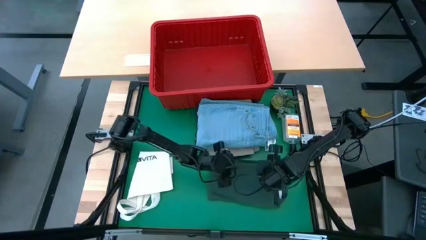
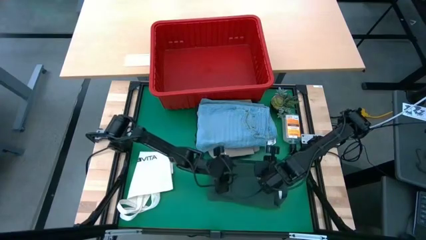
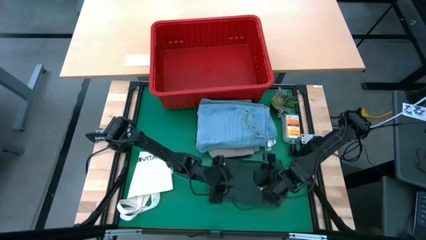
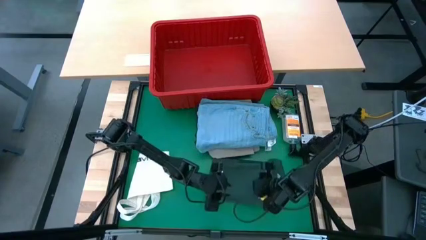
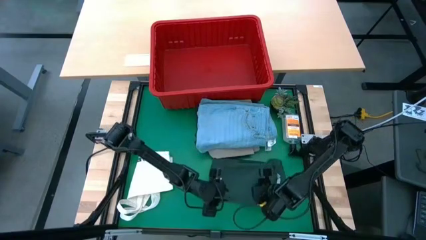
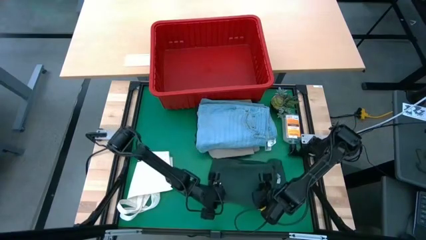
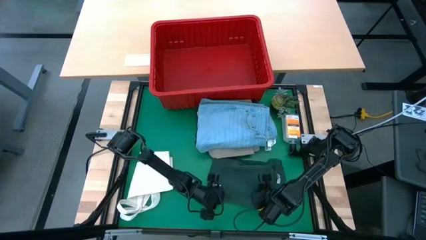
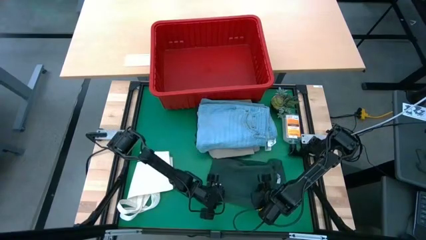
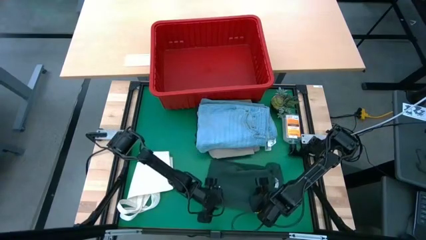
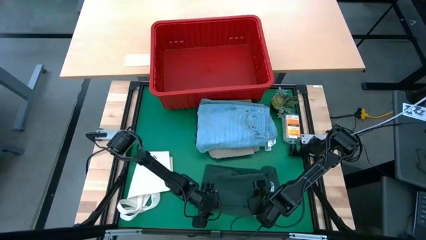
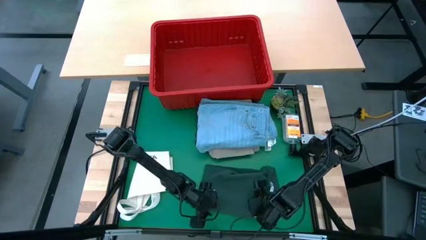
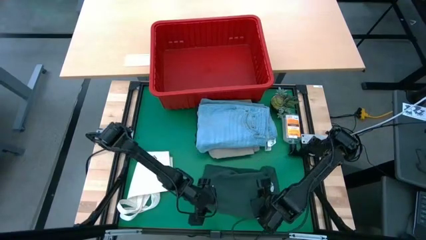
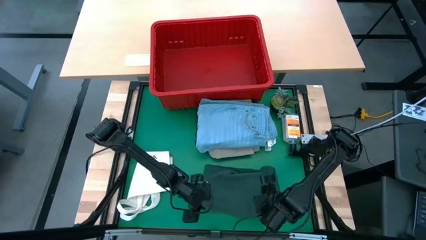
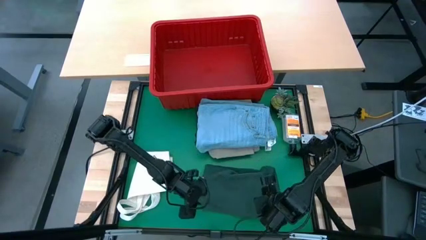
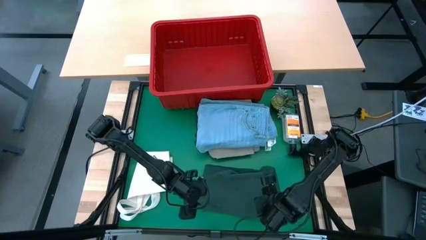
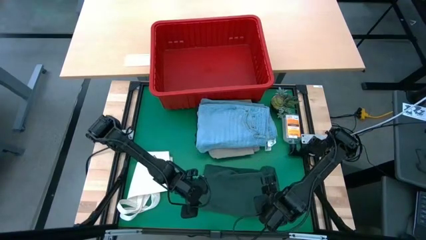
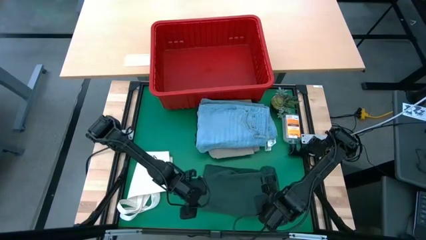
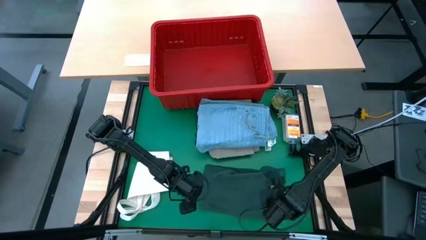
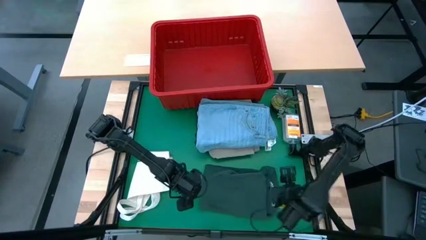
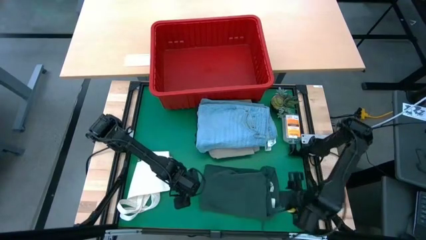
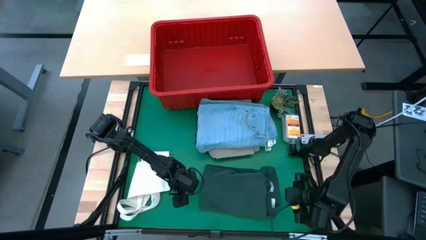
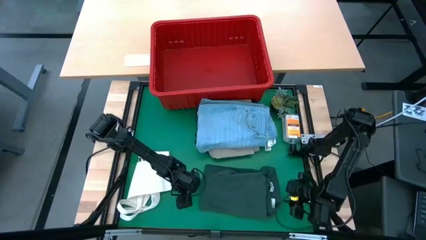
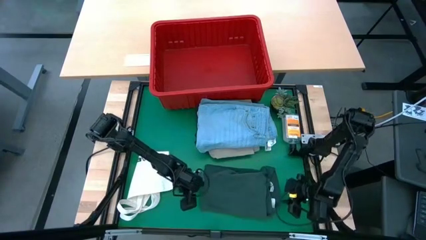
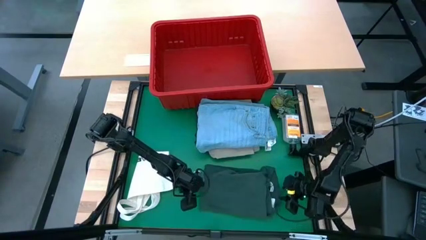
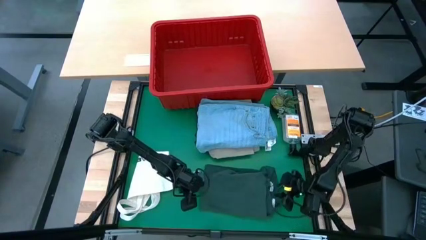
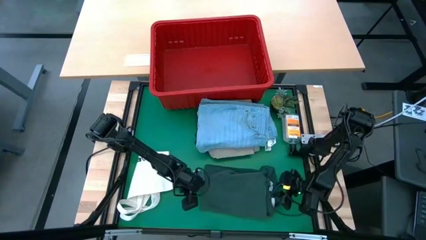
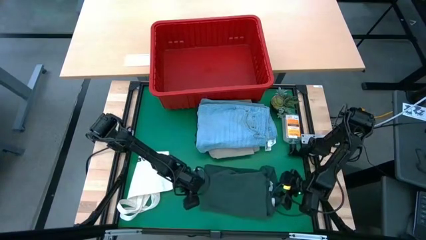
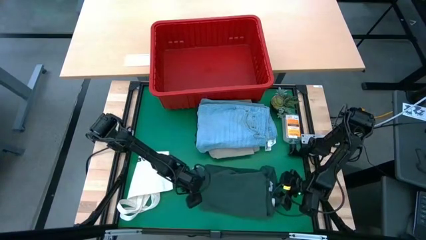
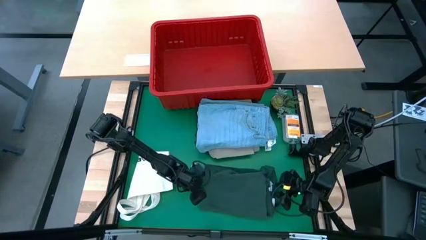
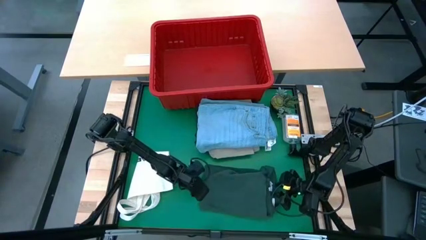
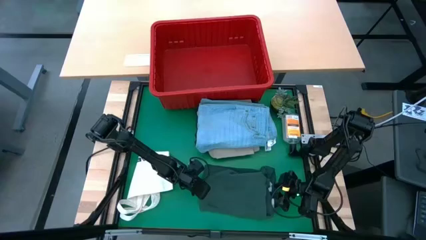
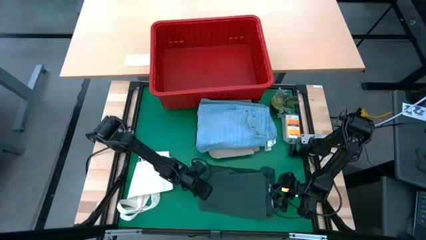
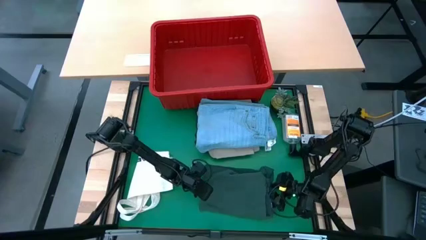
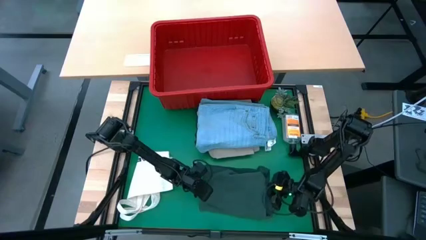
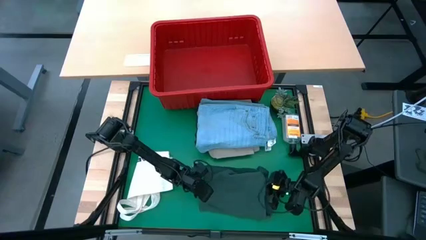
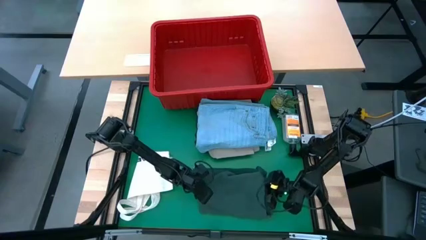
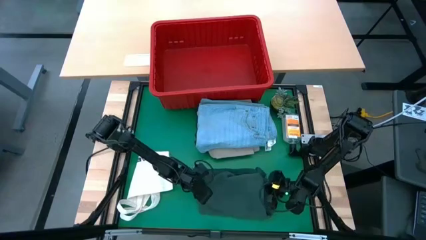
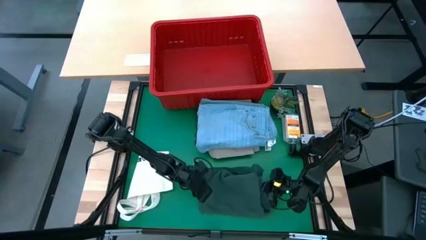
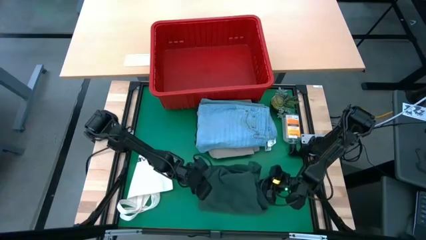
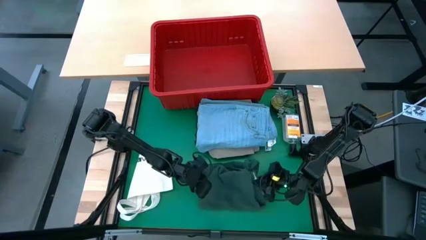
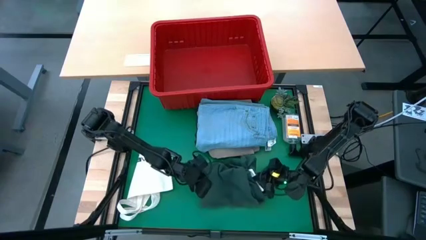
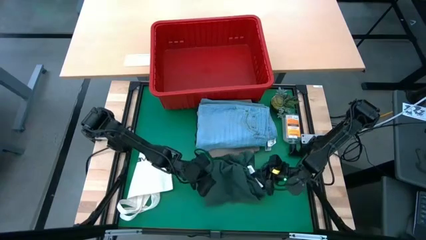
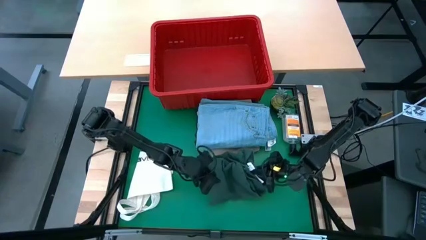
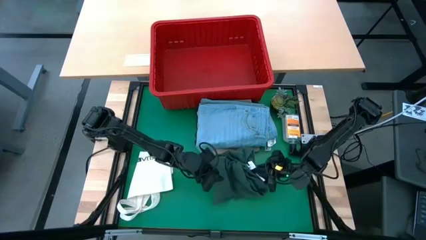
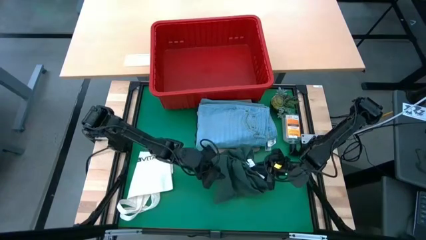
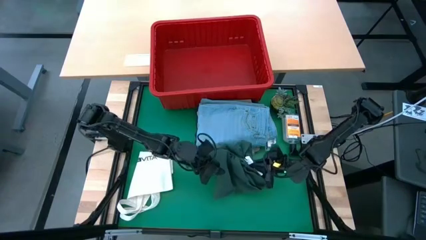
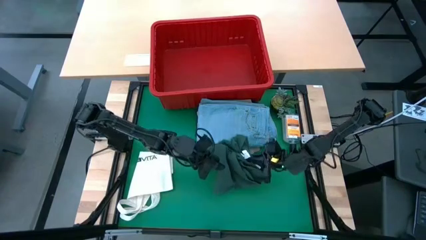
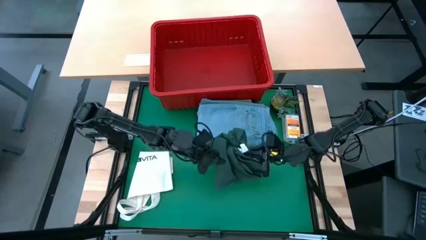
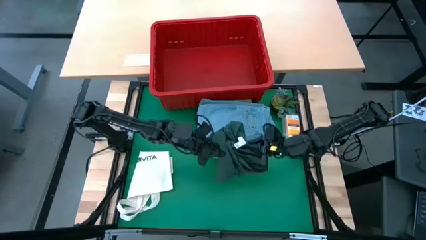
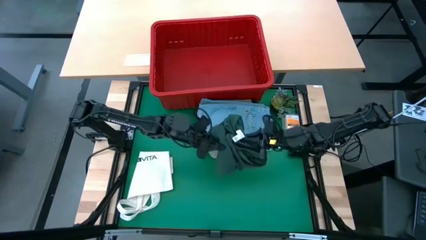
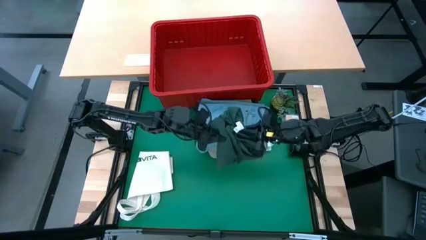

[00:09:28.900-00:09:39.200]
Task: Fold laundry
Stack the green polo shirt on the blue pants

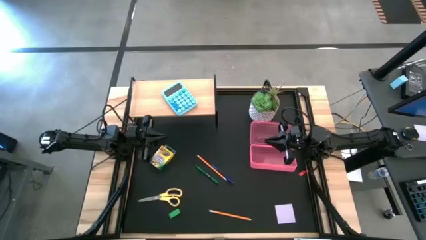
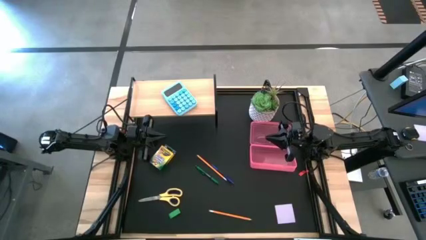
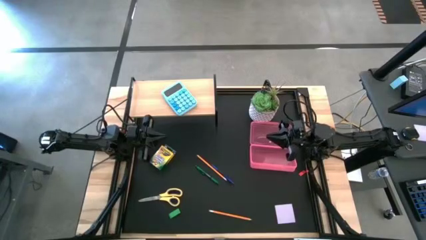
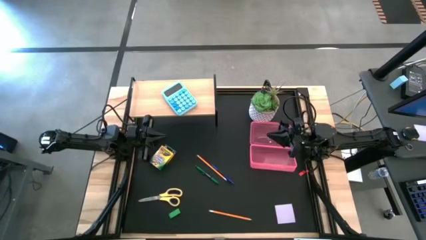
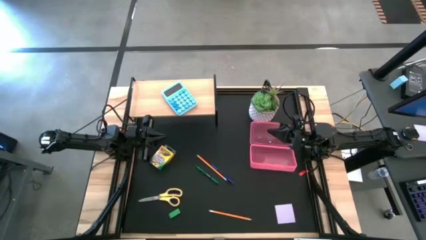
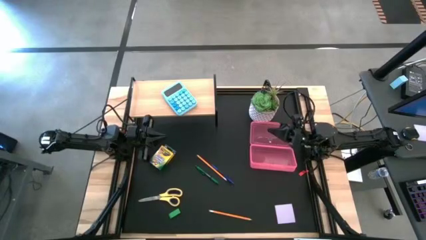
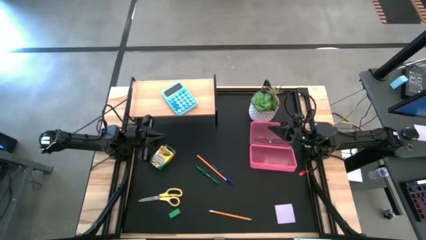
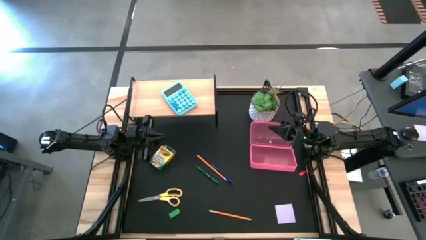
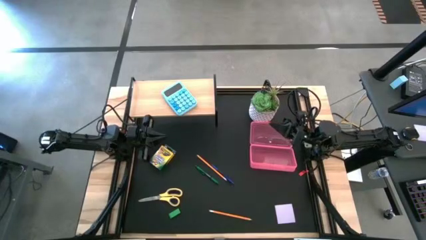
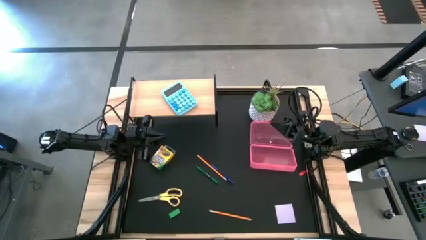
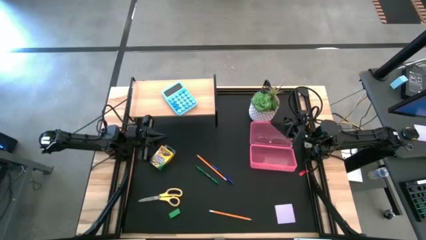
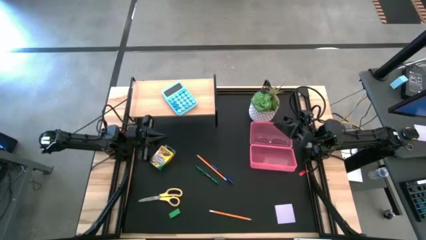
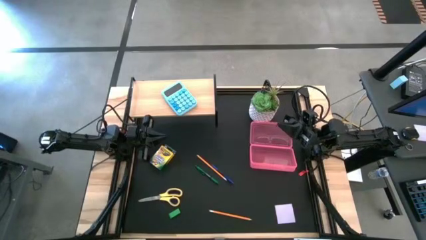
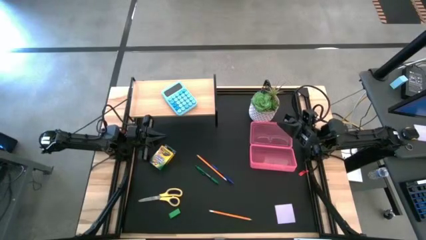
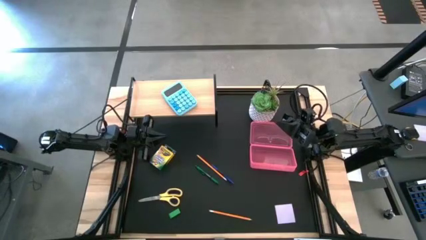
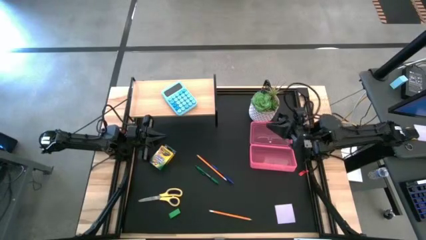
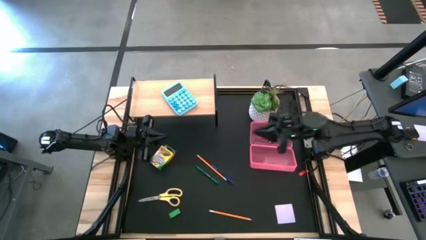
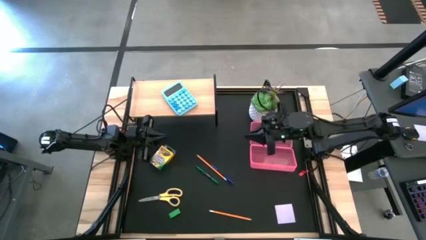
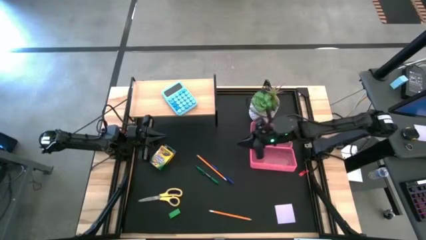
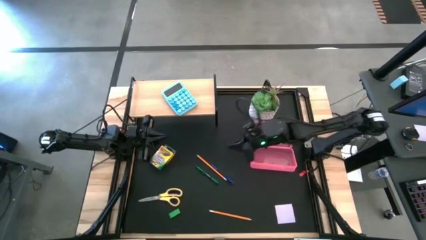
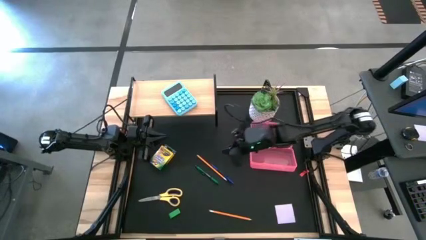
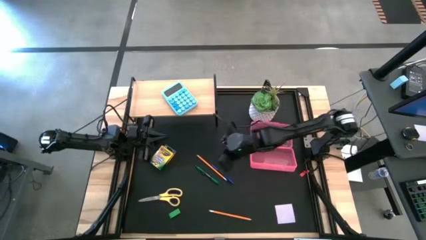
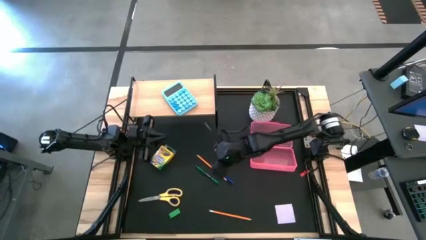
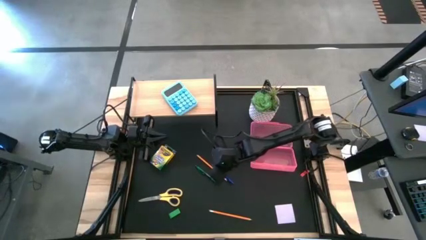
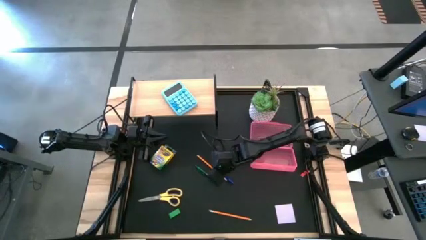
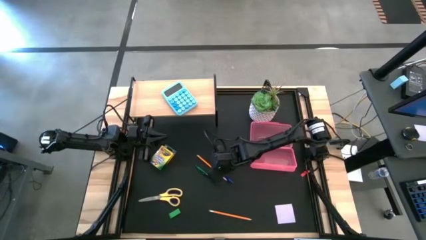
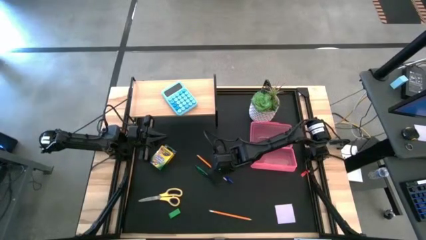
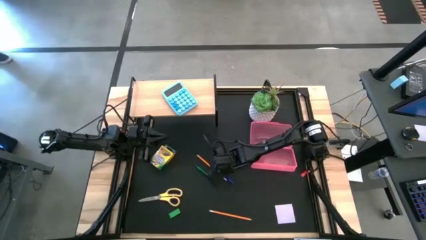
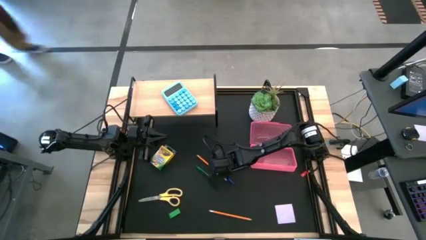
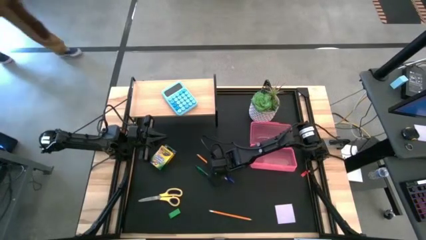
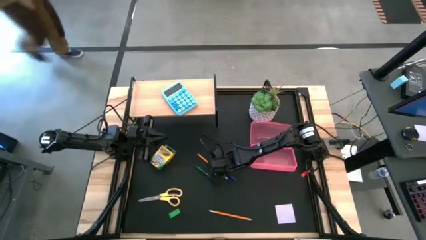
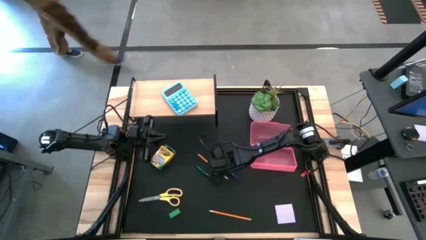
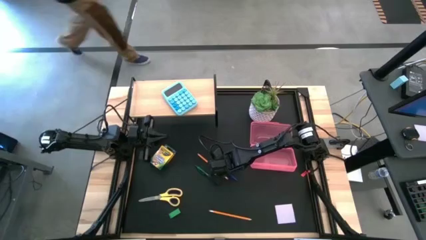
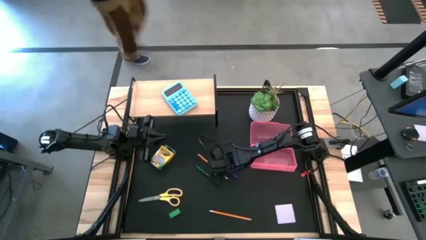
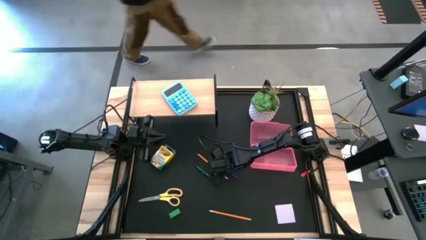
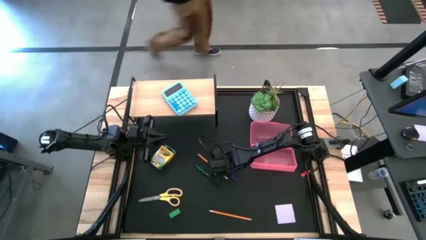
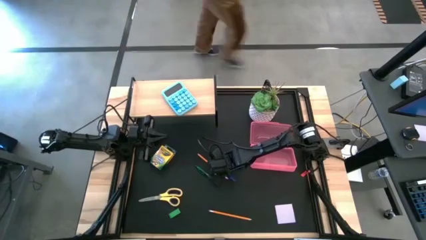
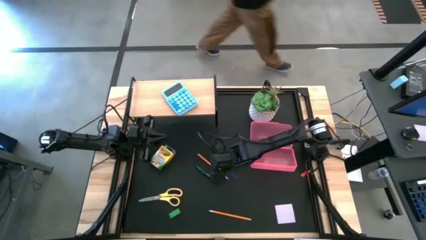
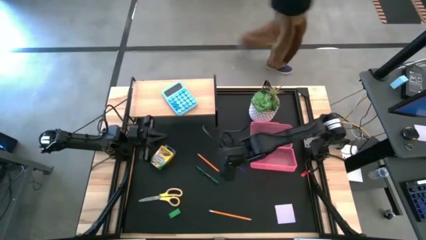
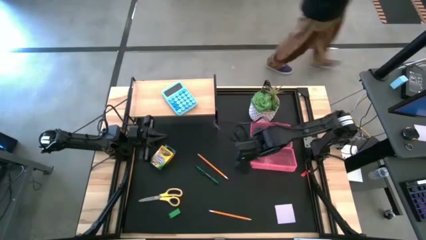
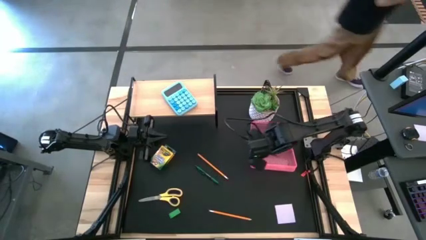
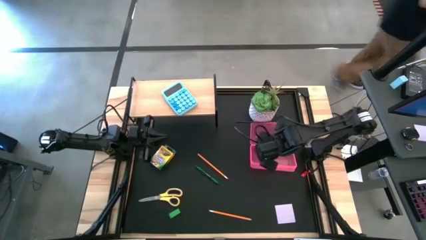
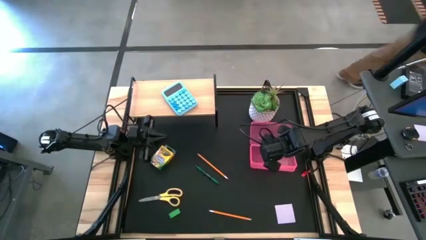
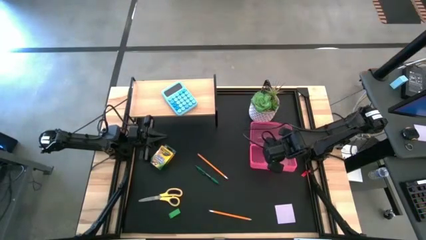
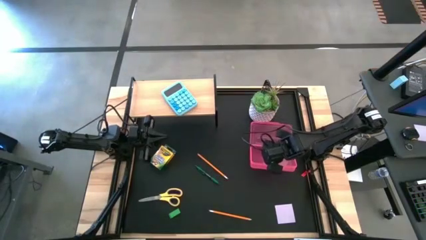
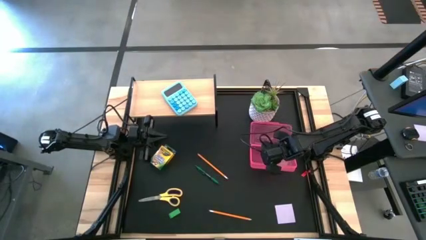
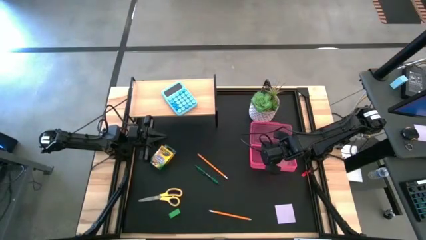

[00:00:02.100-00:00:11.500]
Task: Pack school essentials
Put the blue pen into the pink supply box
